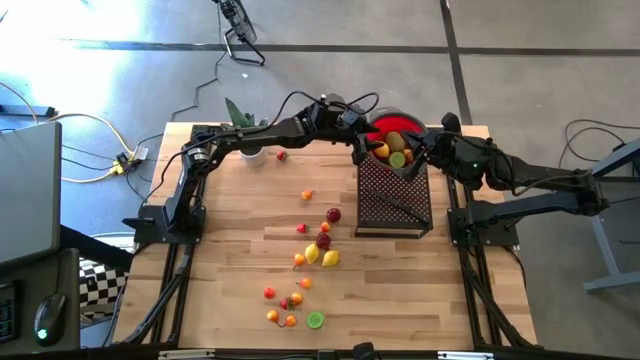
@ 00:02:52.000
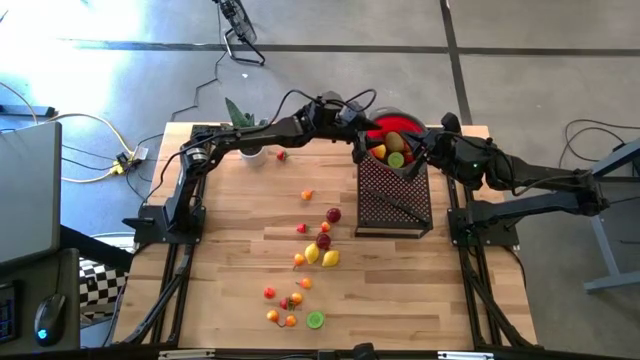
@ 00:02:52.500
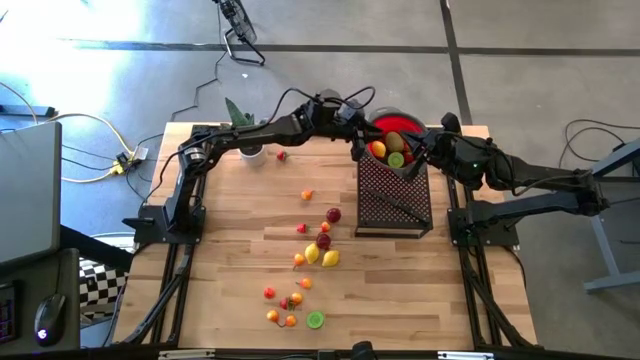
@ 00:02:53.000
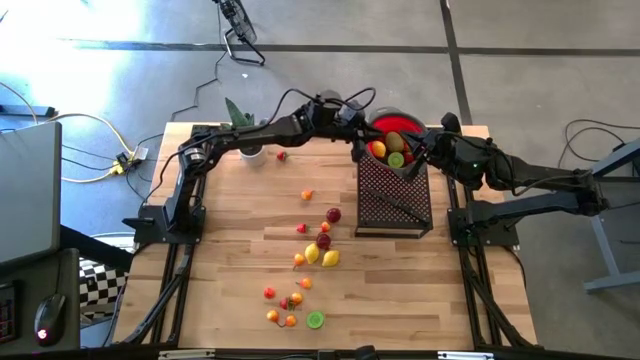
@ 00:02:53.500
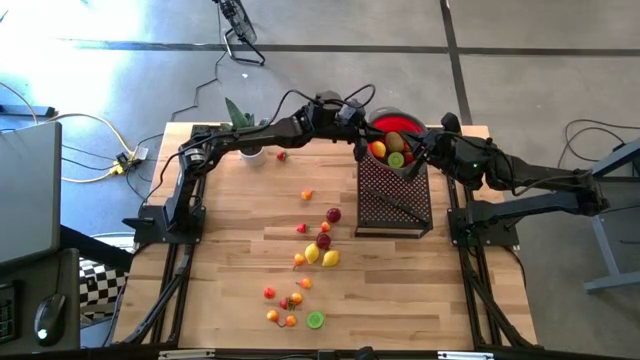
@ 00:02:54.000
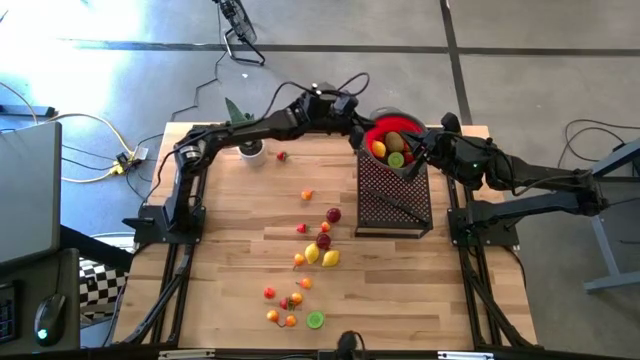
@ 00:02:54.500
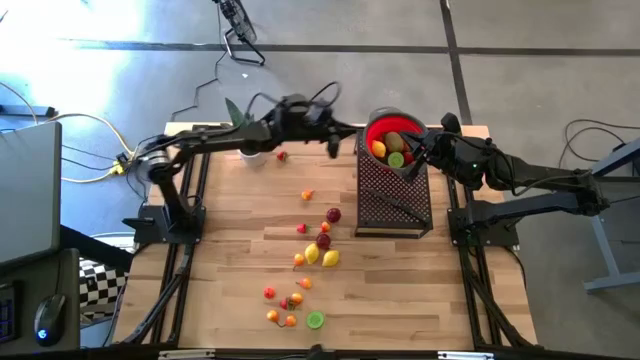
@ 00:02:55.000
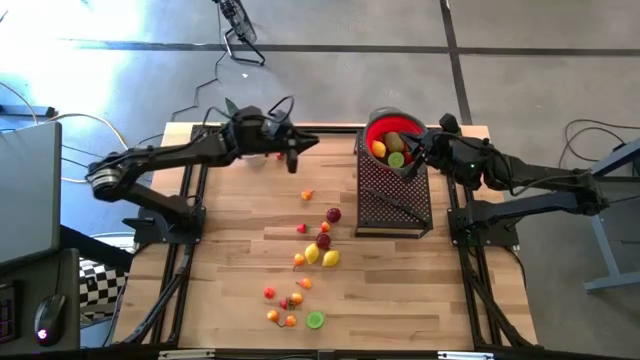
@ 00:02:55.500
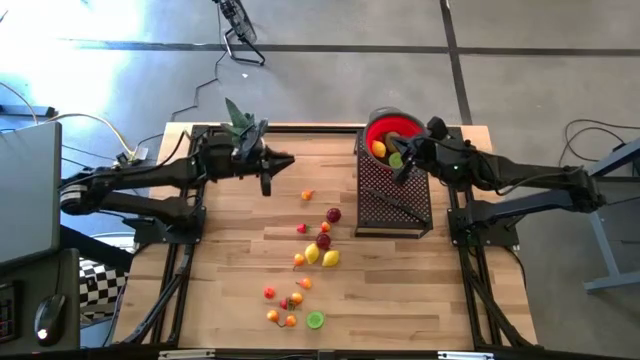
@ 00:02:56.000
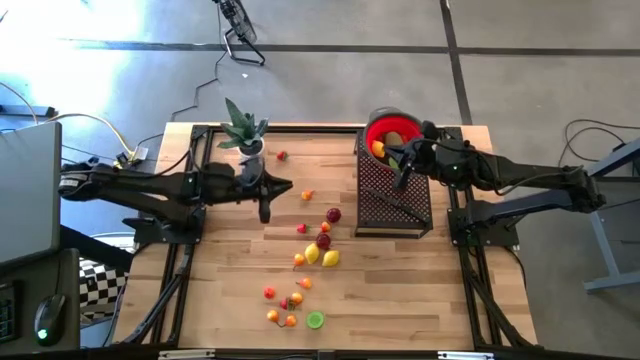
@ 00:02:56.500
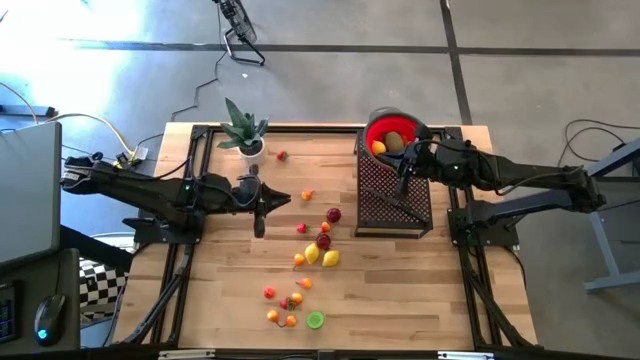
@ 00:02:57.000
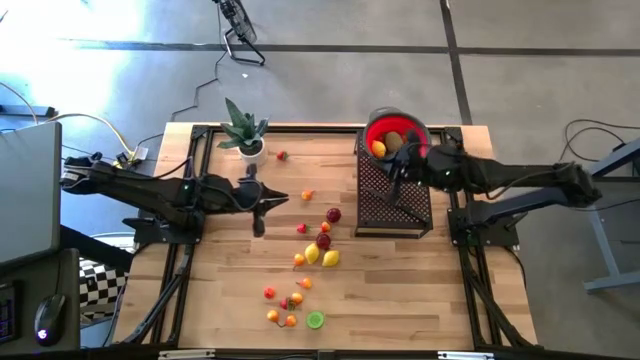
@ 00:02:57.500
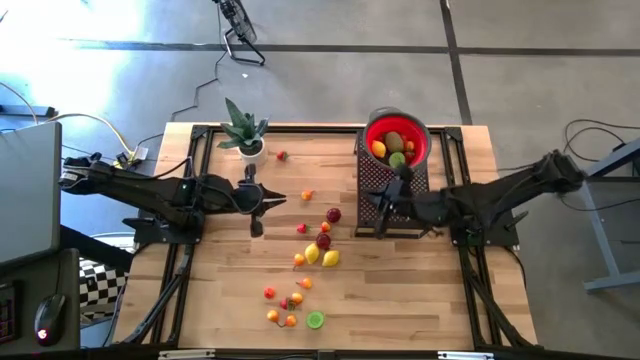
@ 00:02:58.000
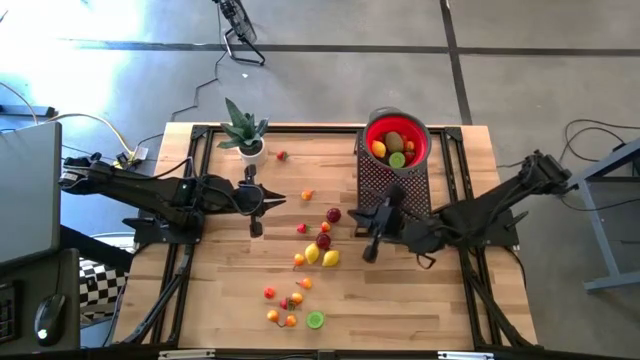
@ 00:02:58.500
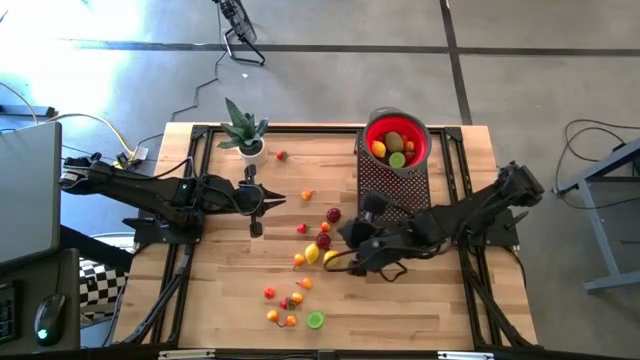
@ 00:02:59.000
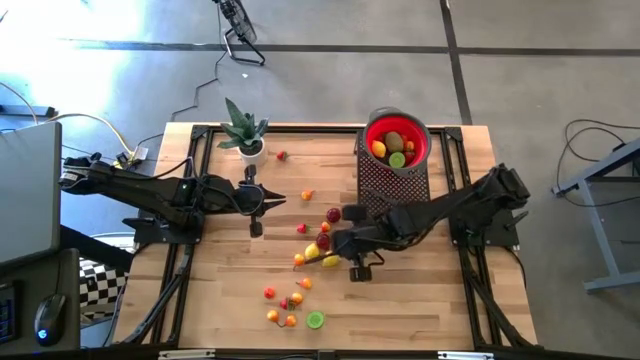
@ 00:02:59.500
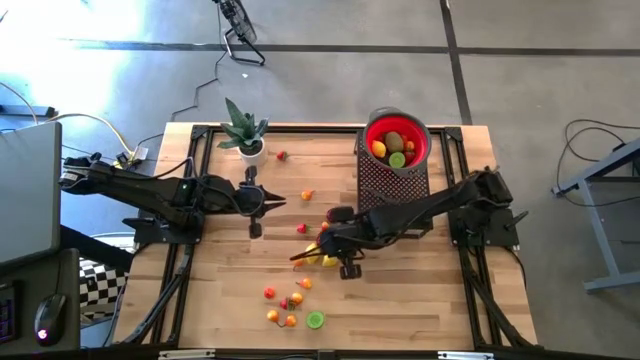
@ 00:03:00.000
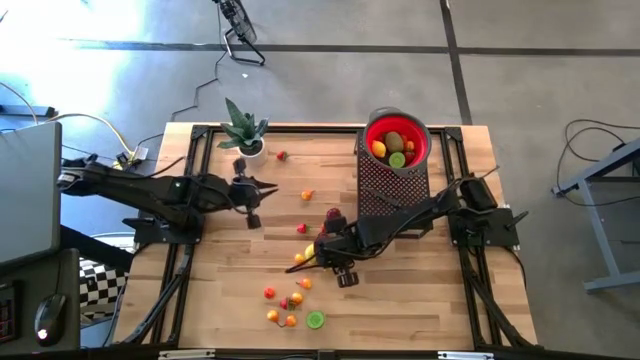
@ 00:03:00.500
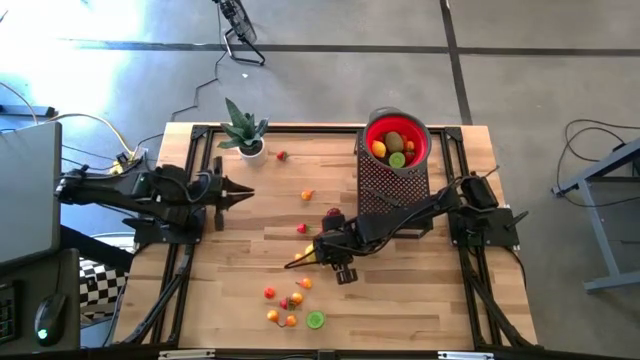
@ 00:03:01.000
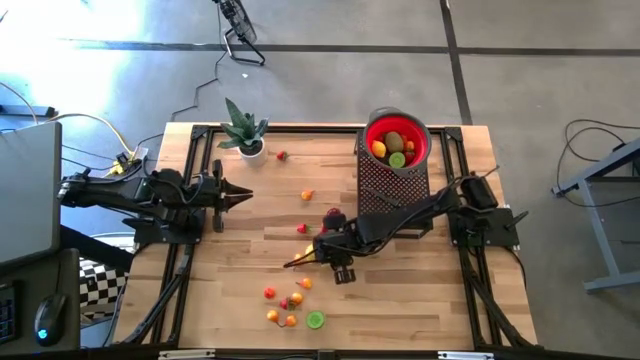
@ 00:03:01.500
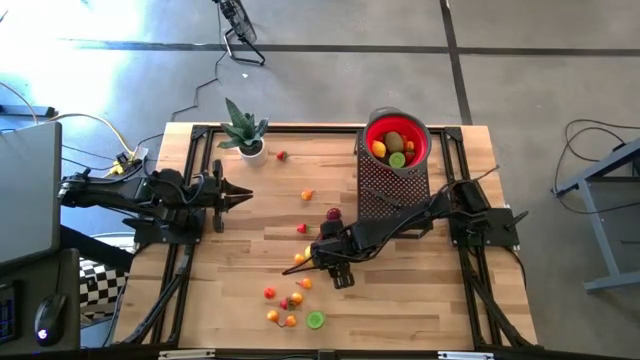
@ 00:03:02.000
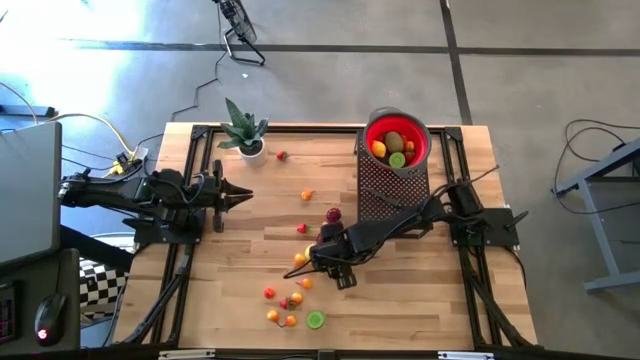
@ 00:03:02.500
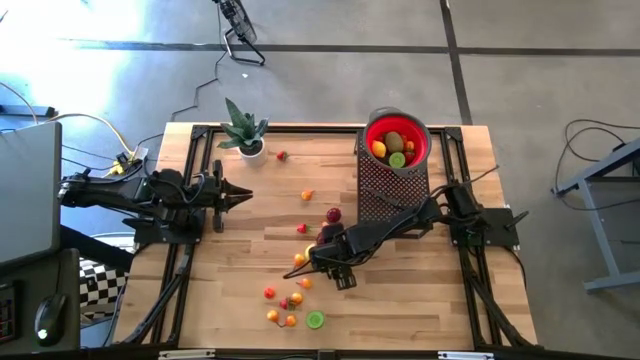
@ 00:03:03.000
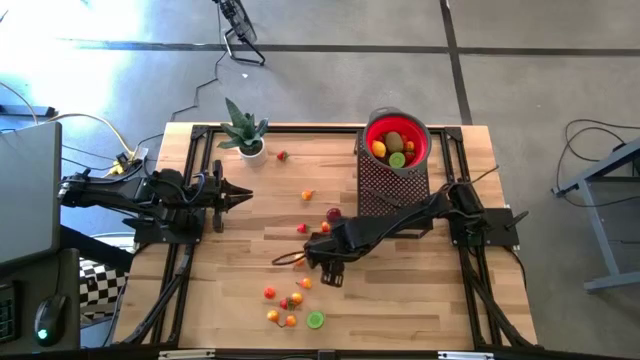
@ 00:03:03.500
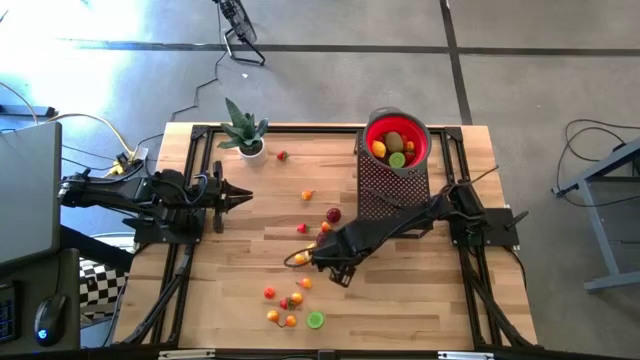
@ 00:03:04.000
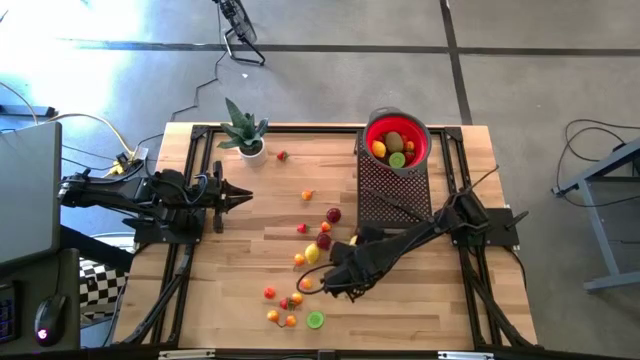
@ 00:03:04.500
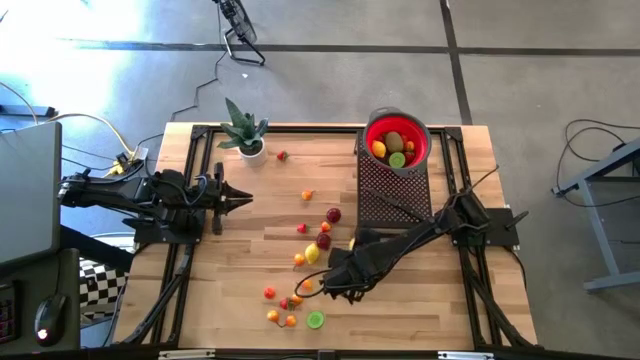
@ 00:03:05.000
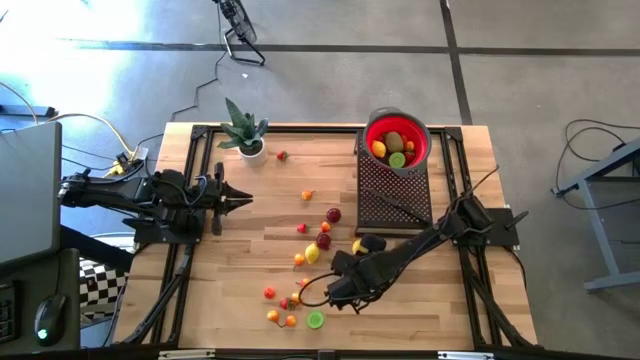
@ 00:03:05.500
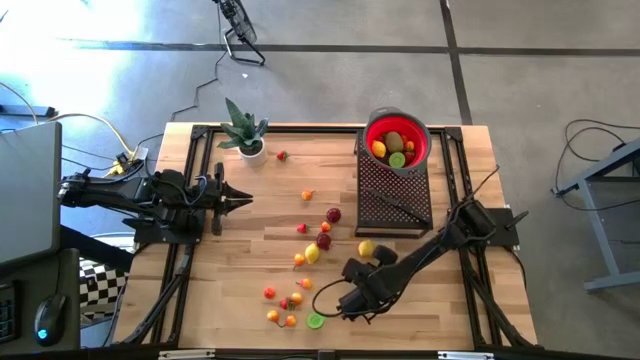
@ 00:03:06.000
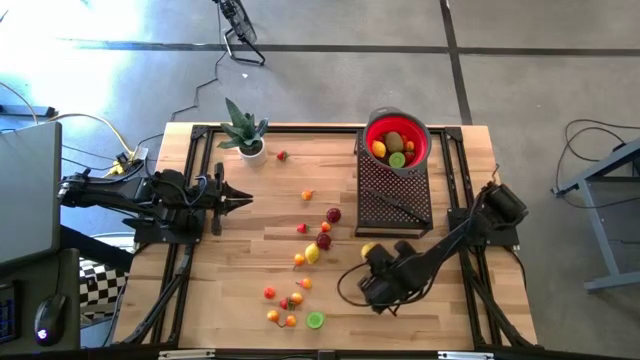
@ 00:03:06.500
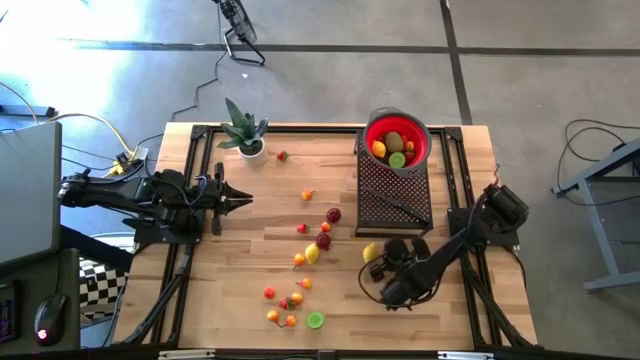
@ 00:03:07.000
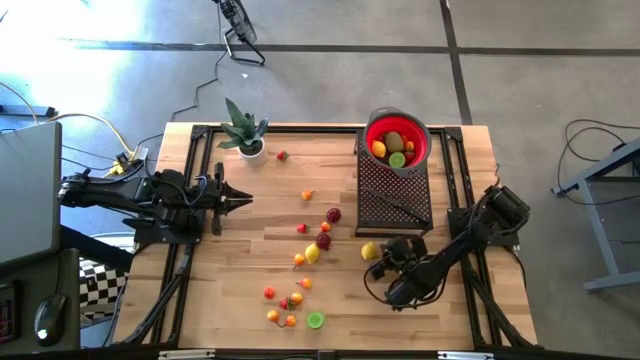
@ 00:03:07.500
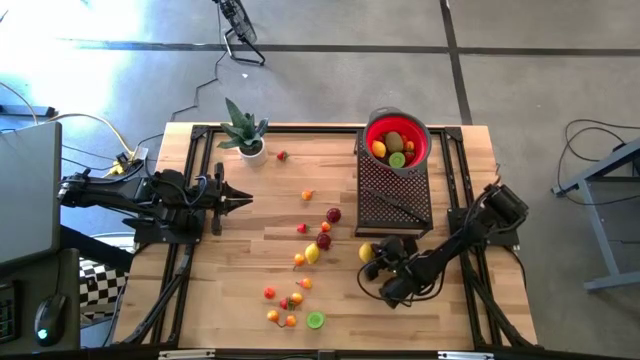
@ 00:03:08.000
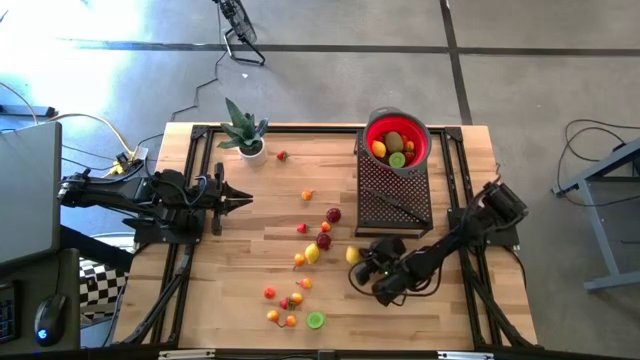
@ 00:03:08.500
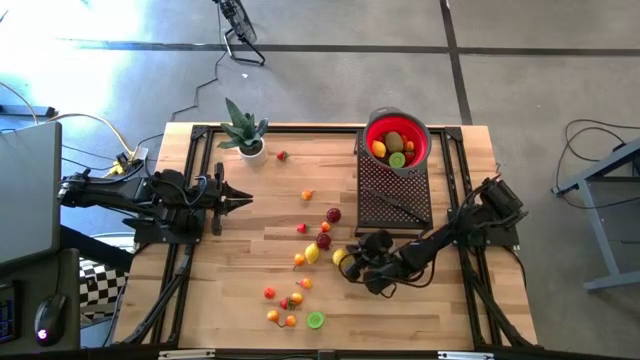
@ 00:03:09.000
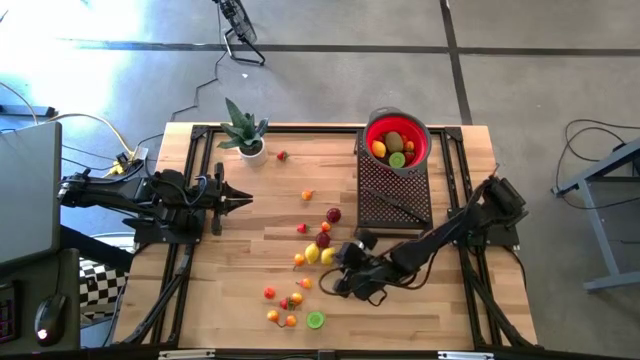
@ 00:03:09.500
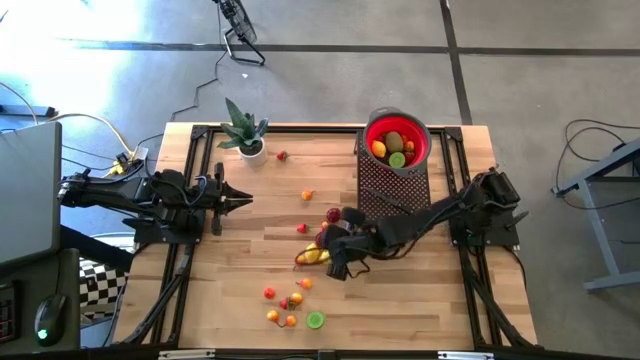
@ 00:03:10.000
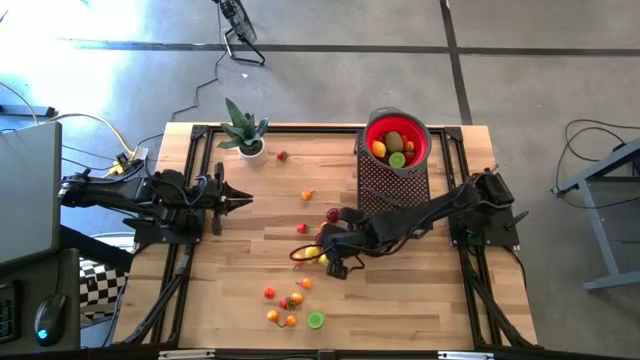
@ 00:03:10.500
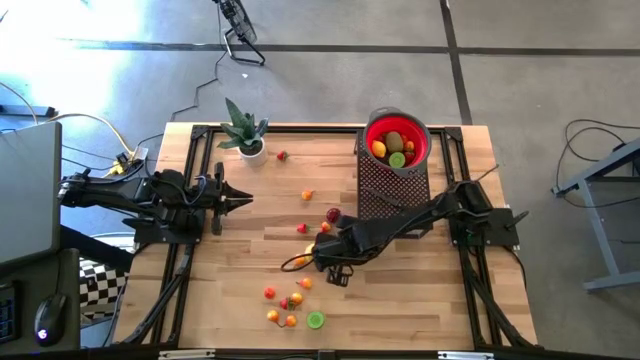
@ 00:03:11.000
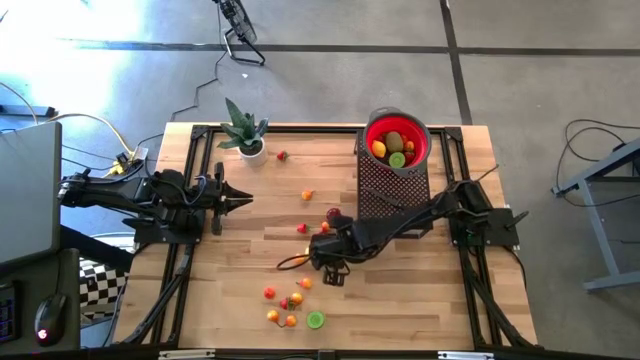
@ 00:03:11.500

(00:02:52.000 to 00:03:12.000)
Task: Pick & Place Fruit
Put the lemon into the strainer bowl on the shelf

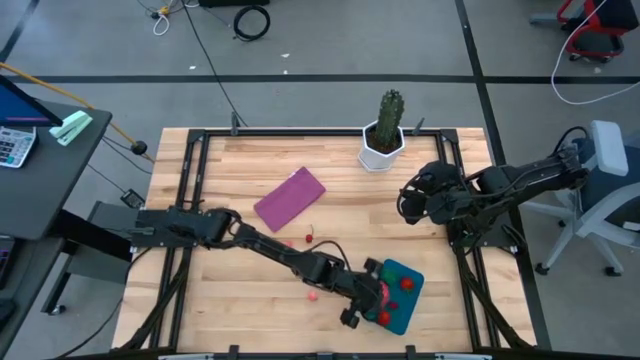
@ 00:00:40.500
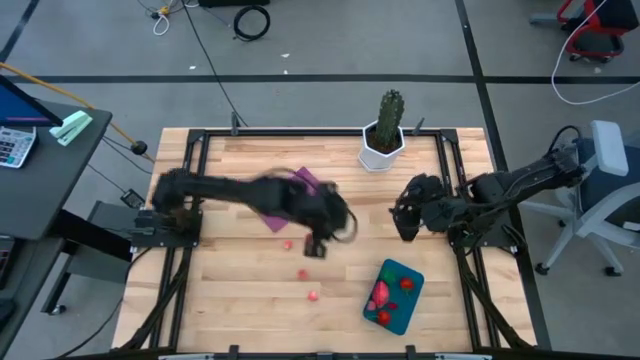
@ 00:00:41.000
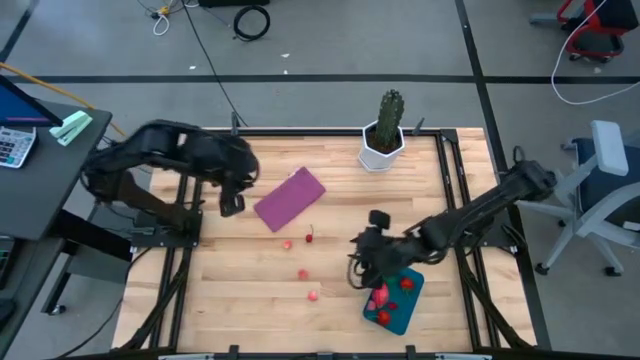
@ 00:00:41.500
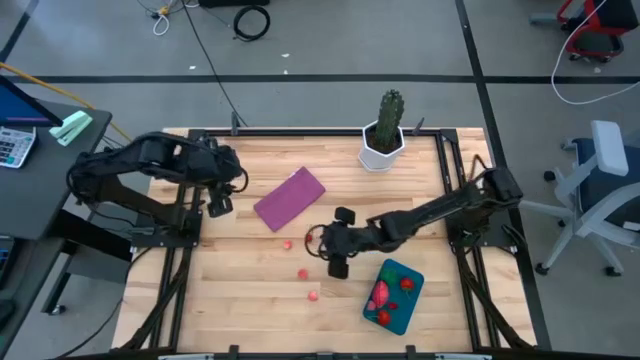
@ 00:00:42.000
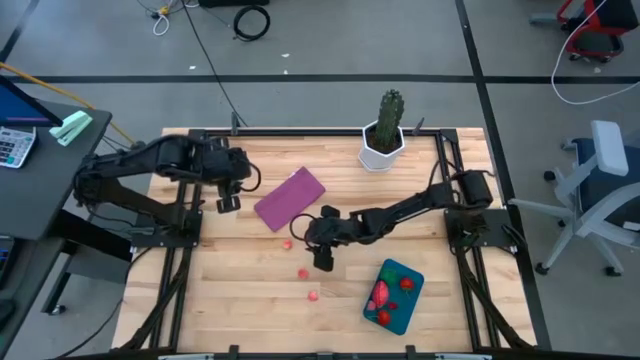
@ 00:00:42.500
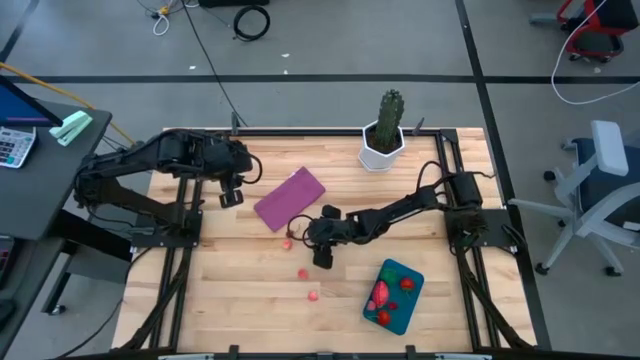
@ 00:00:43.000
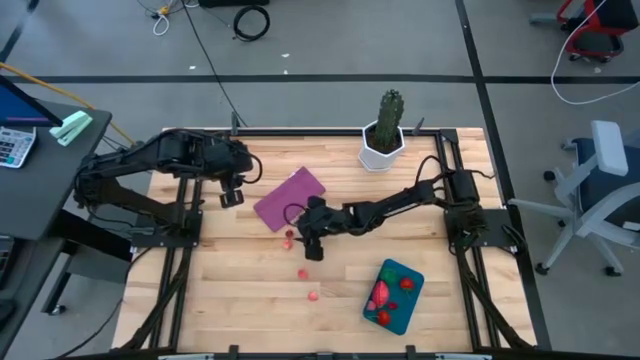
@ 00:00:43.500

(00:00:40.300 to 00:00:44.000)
Task: Pick and placing Produce into tupperware
Put the cherry into the blue bin
